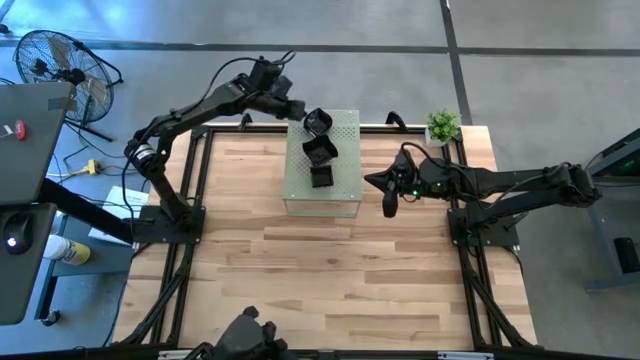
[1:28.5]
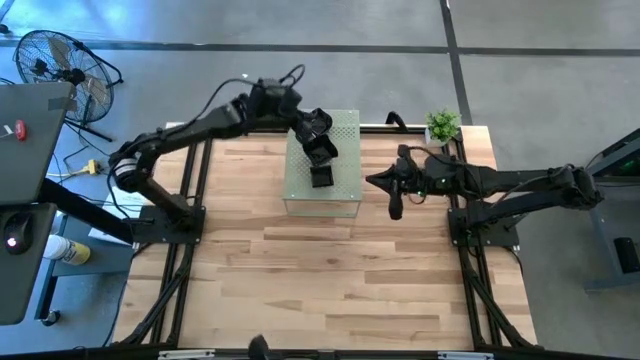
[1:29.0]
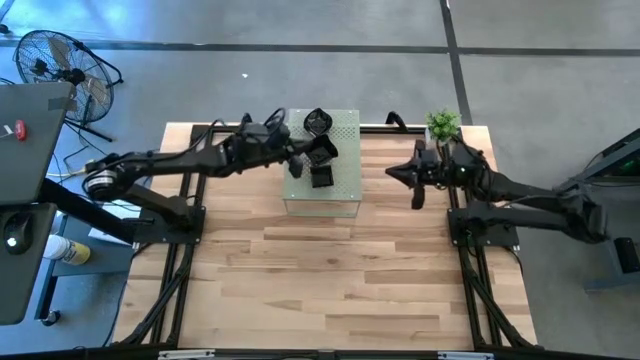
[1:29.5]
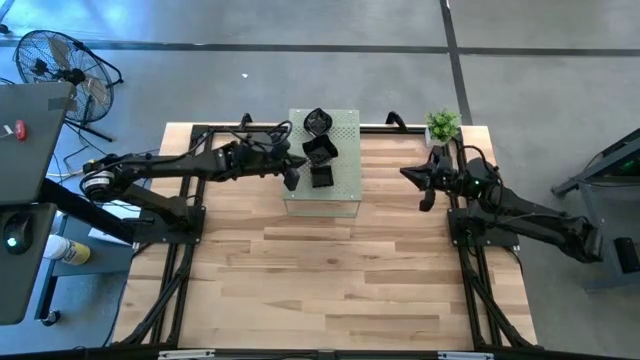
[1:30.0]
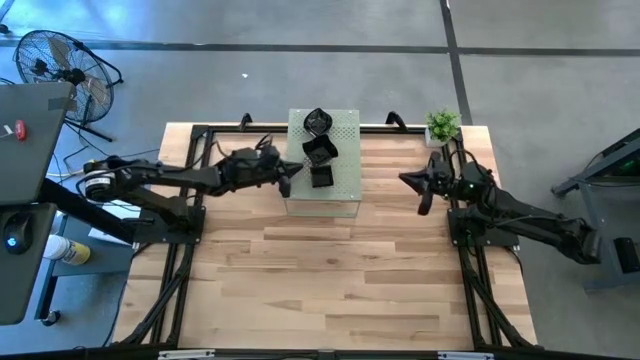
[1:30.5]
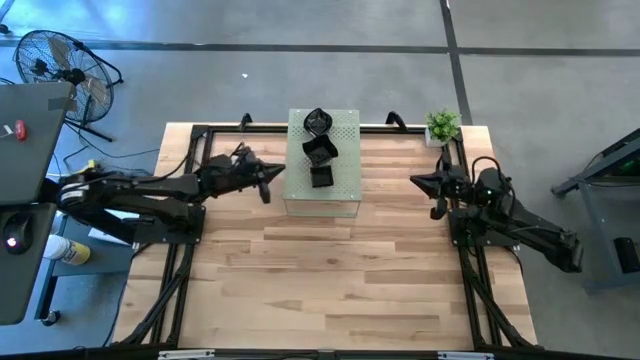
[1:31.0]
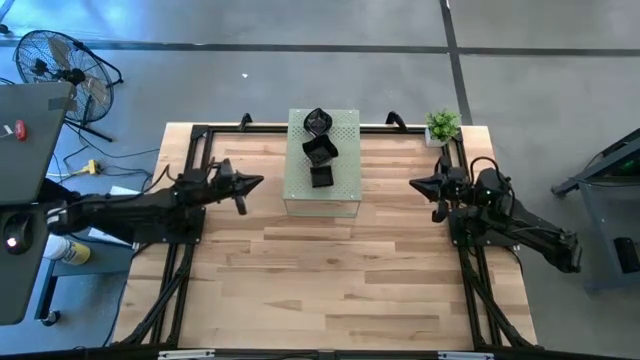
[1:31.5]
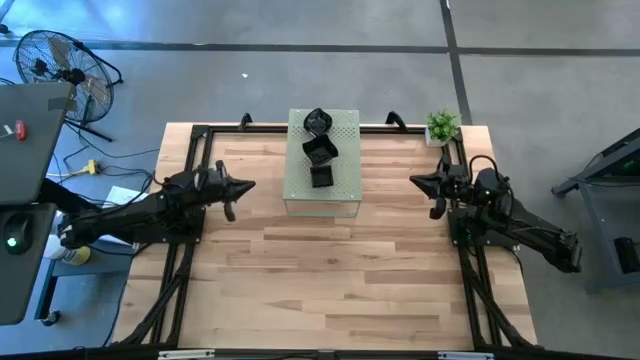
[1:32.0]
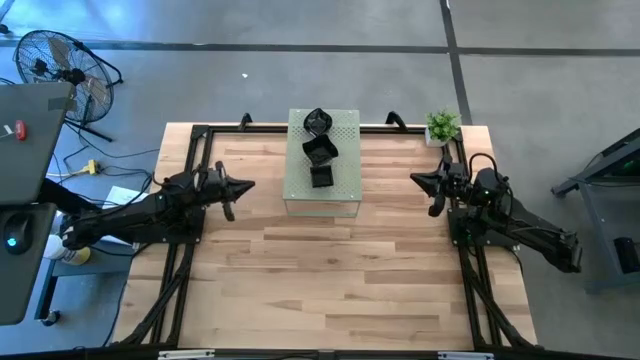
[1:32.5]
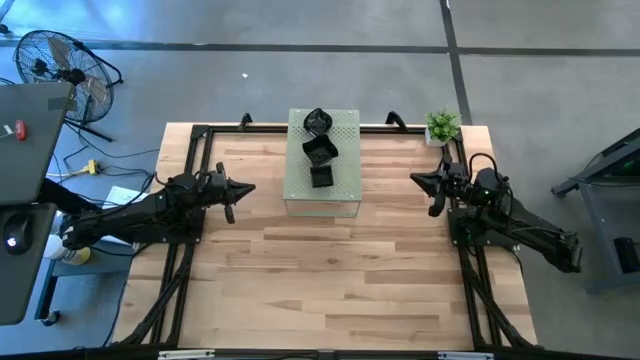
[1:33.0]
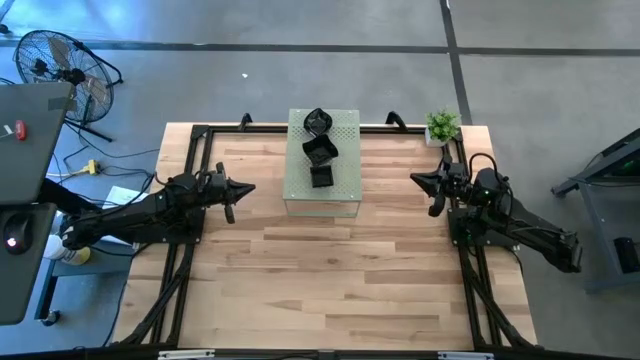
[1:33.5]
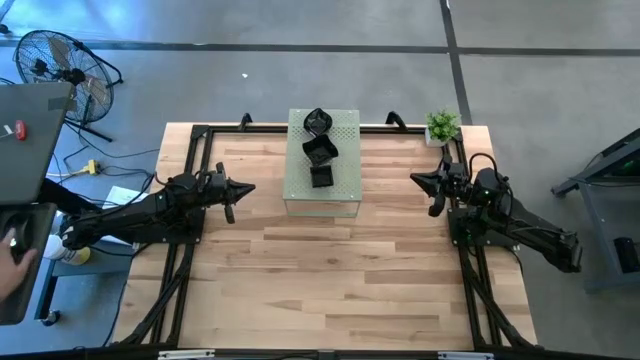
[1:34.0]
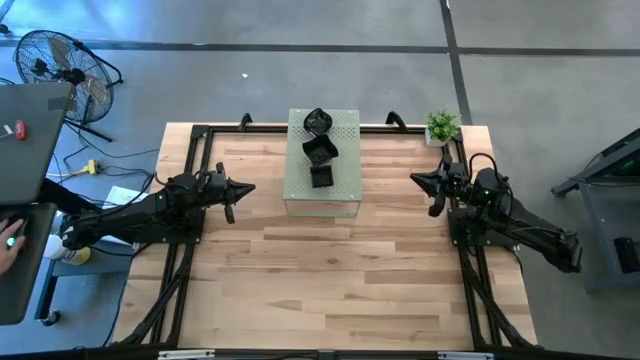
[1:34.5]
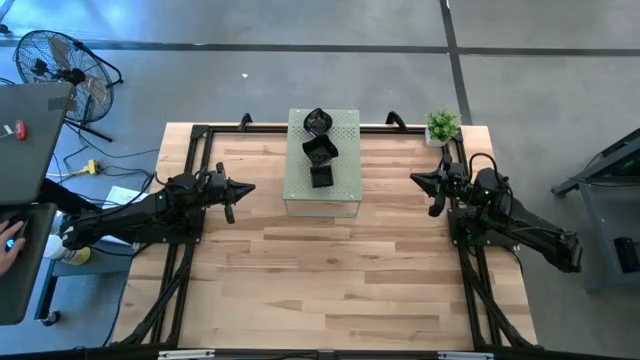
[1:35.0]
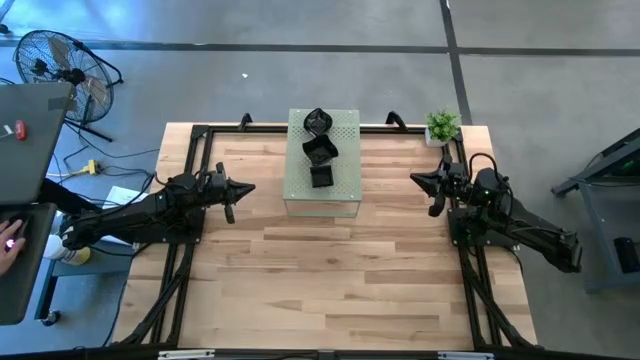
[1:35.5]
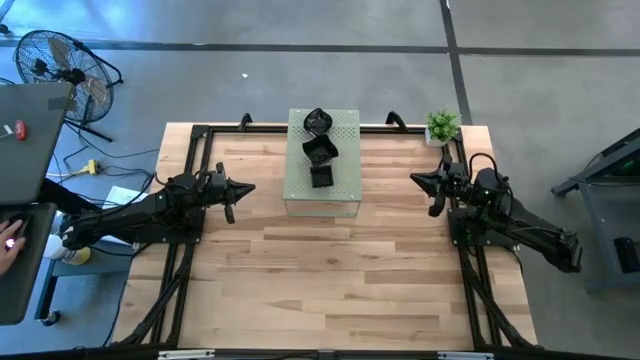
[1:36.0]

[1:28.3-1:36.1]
Task: Pick & Place Mini shaped plates
Return to Home Position

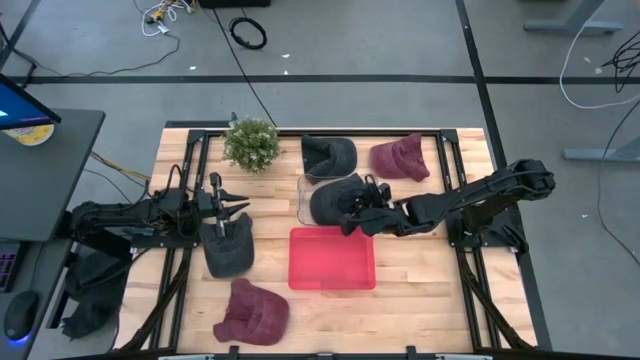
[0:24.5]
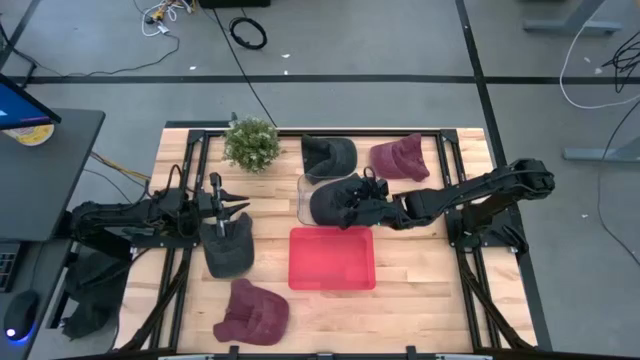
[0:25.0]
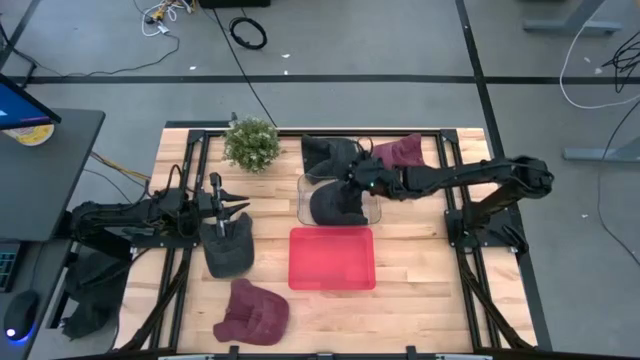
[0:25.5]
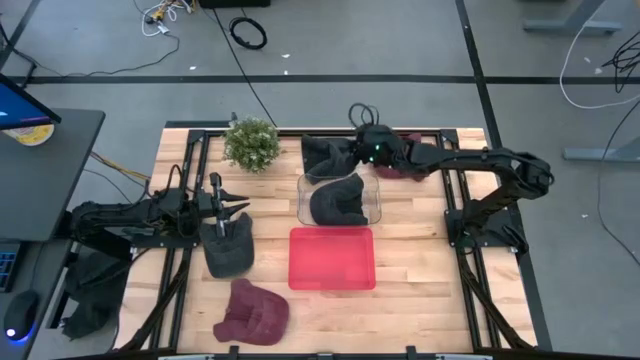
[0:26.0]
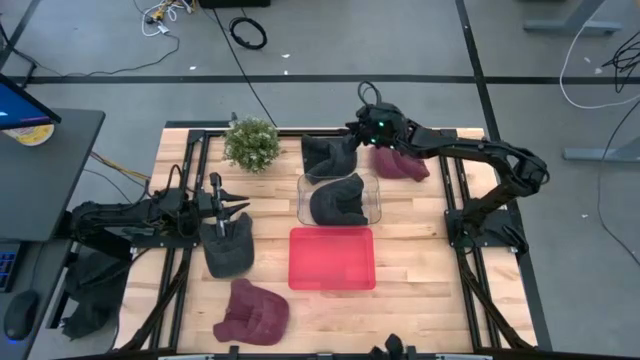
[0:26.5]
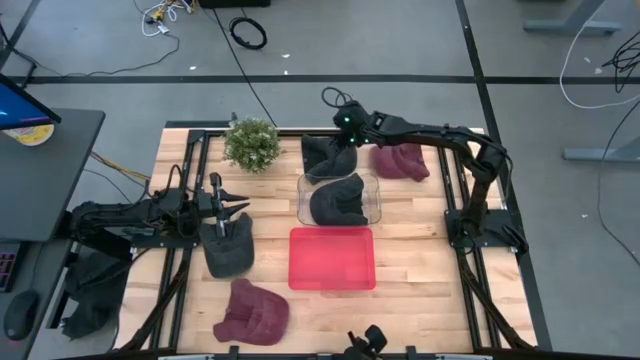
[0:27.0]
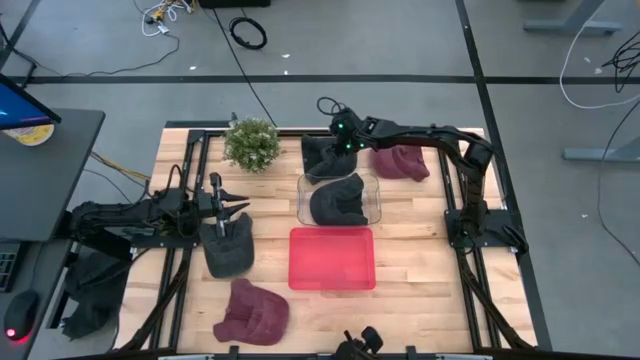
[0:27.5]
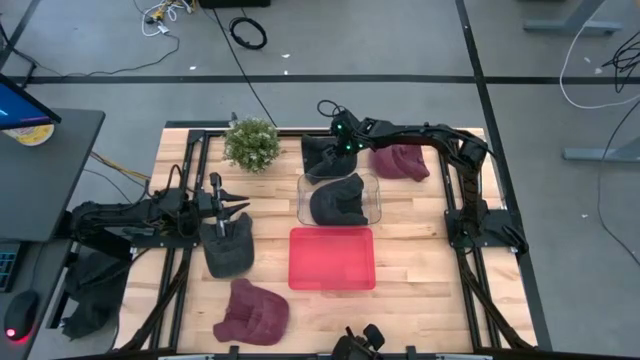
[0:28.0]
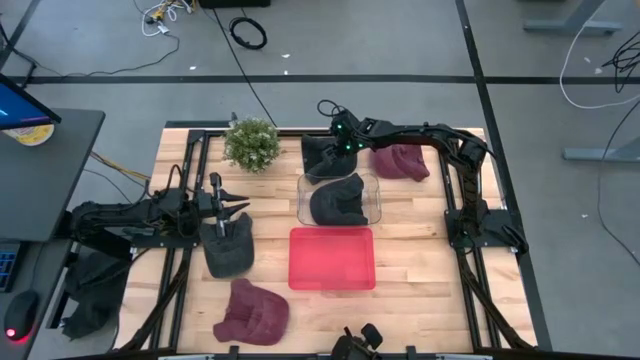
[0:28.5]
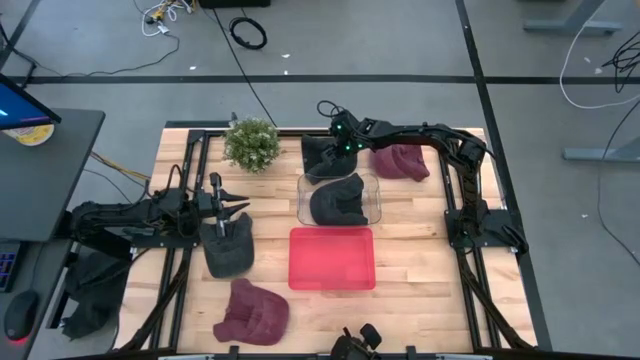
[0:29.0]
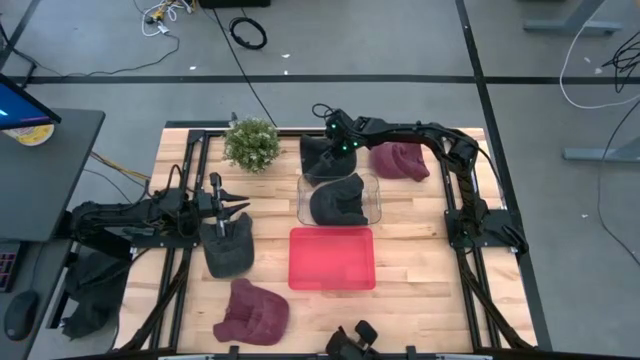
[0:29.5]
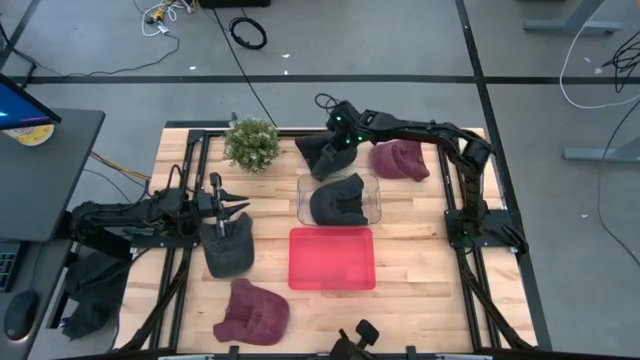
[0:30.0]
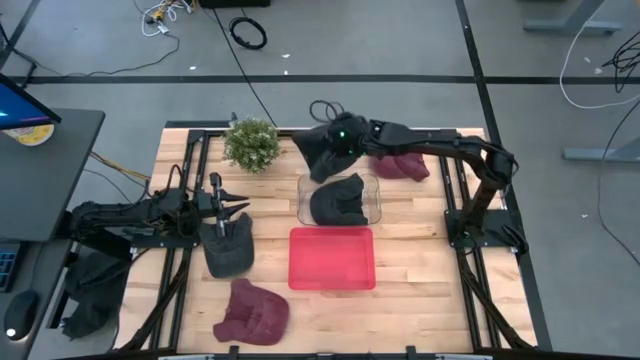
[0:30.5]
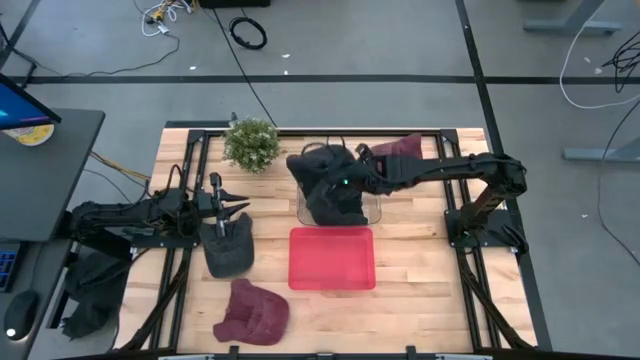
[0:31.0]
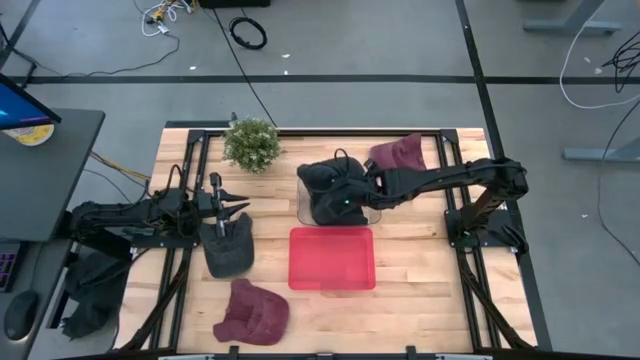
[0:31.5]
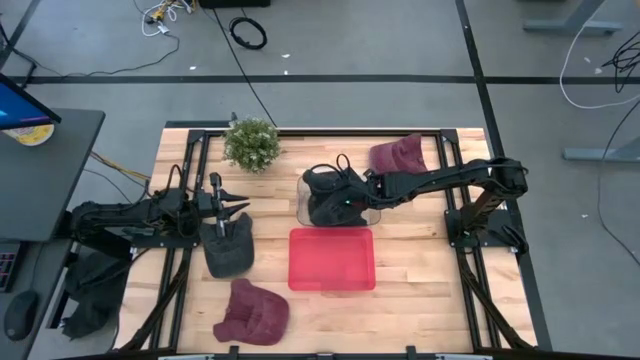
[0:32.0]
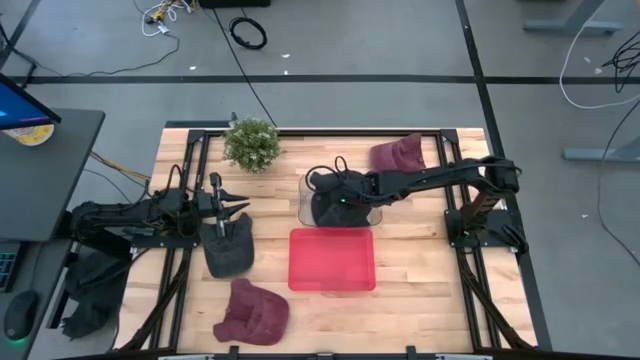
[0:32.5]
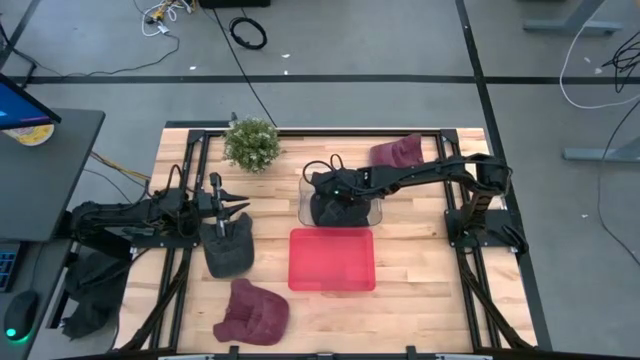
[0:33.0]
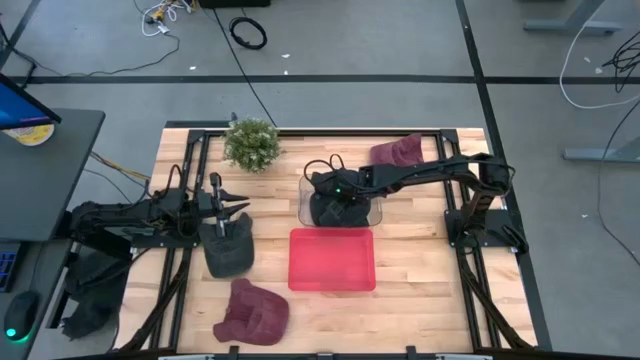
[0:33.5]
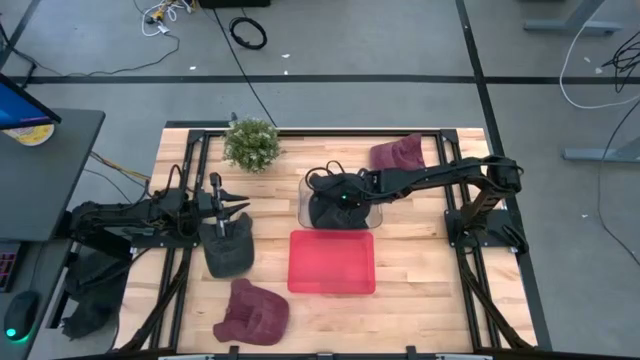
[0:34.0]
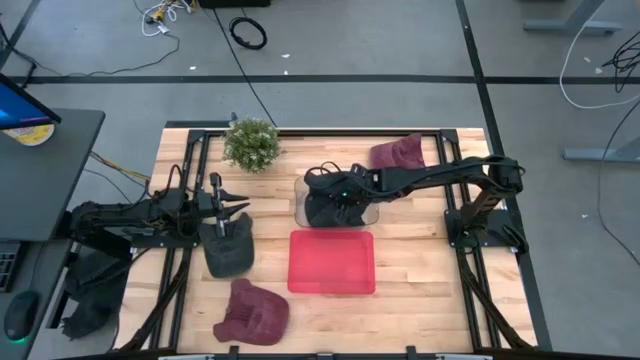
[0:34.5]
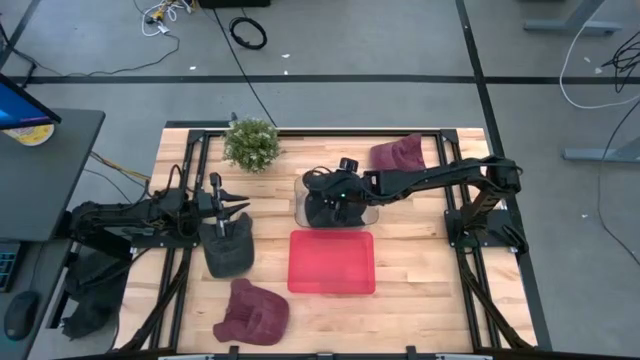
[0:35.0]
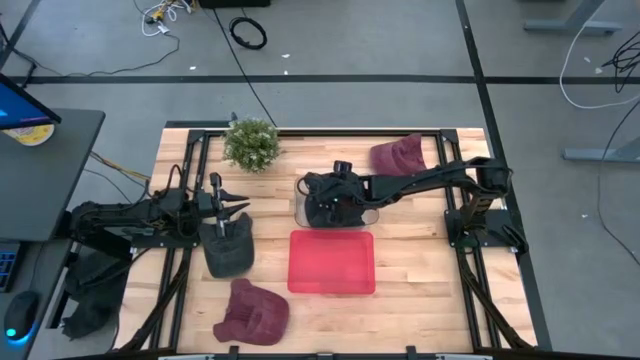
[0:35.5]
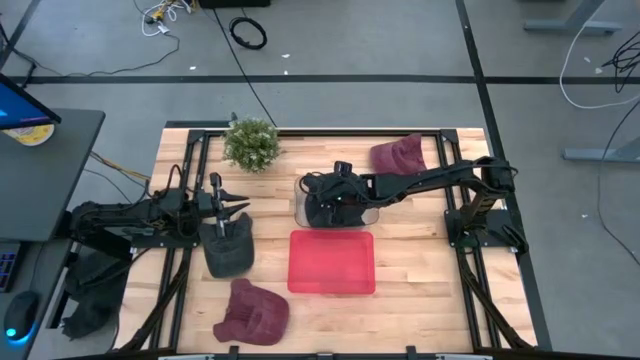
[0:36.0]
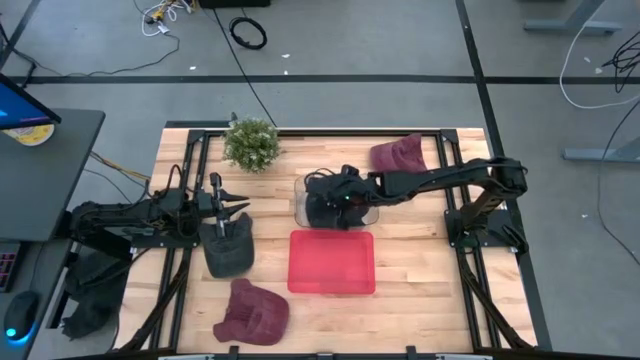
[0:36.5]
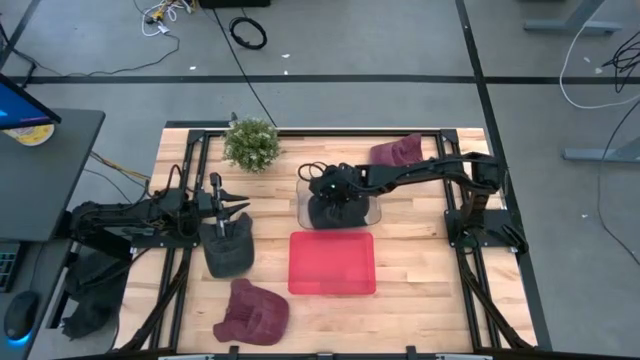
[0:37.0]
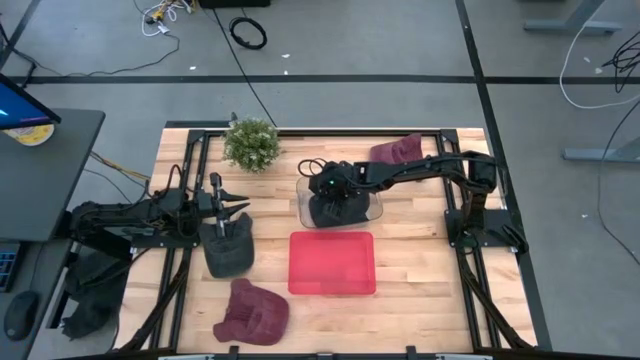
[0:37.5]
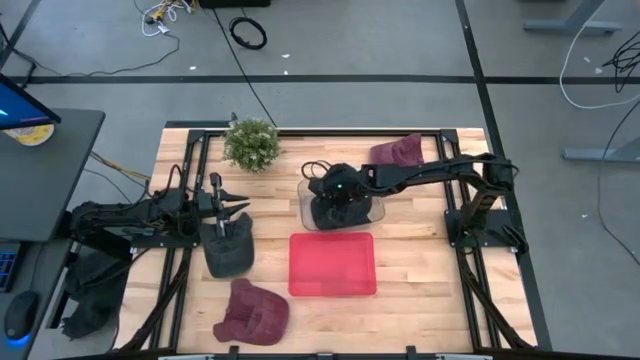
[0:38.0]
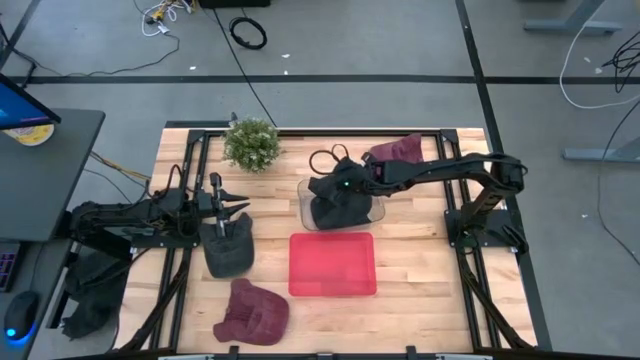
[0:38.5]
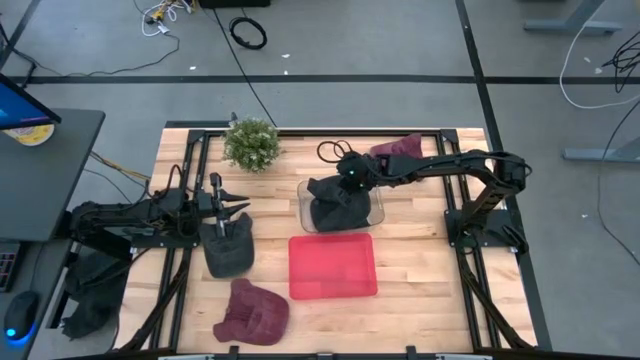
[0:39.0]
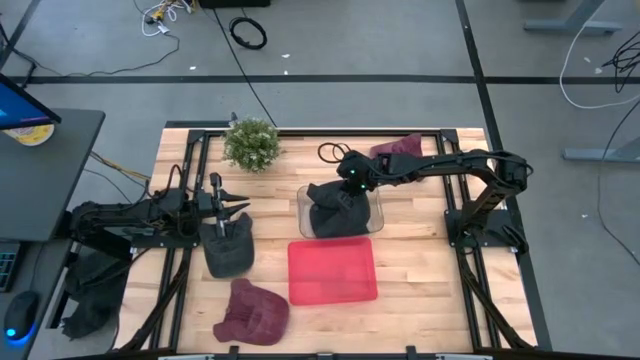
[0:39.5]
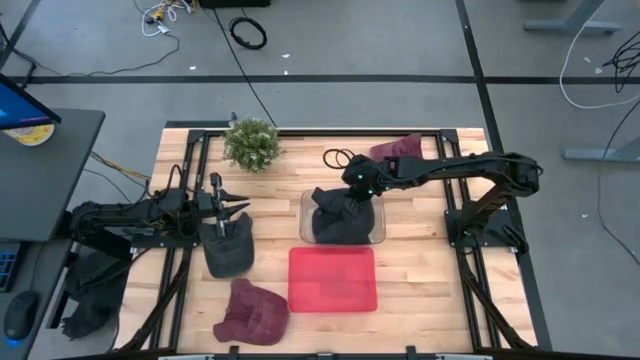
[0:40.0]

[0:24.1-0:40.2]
Task: Pick & Place hat
Put the top black cap into the transparent bin
